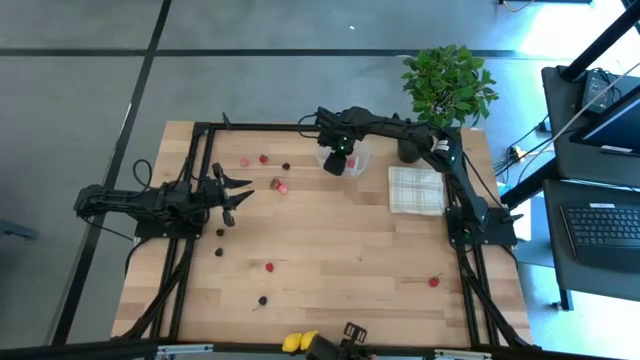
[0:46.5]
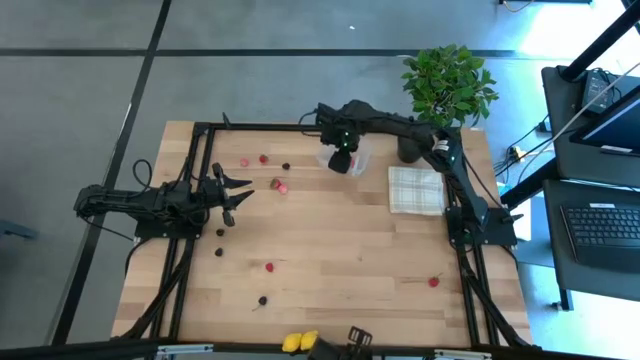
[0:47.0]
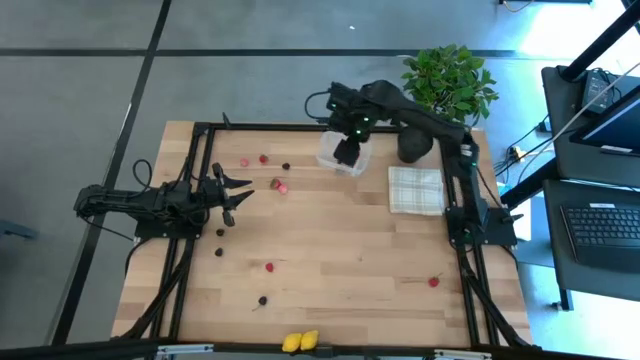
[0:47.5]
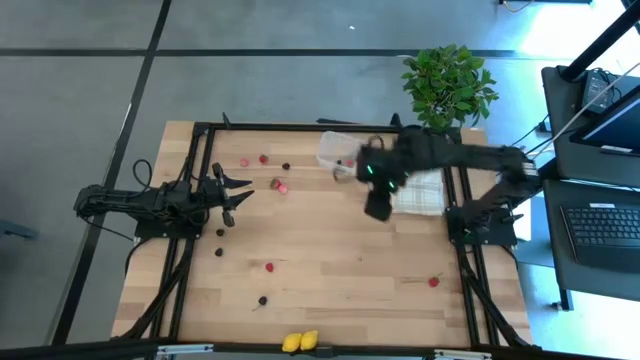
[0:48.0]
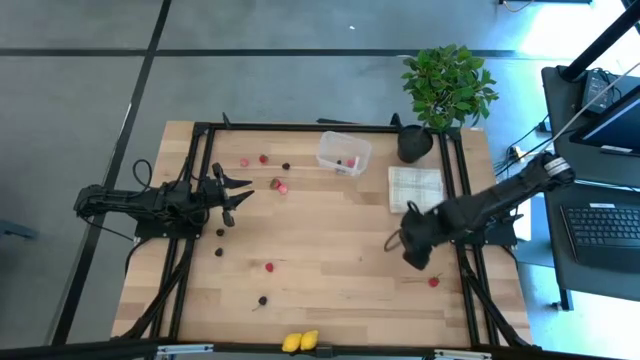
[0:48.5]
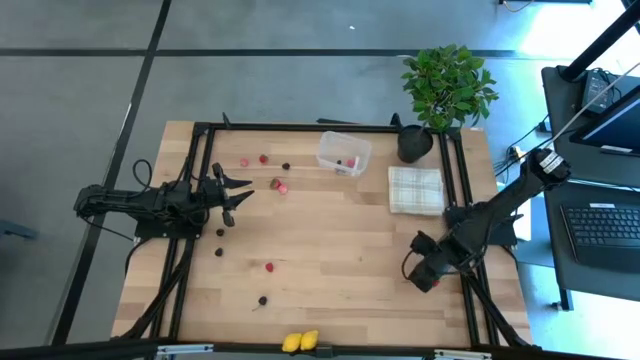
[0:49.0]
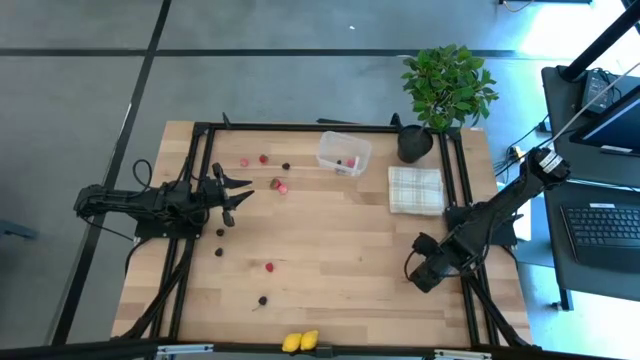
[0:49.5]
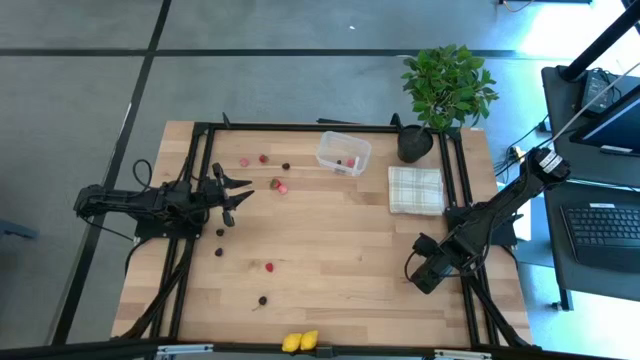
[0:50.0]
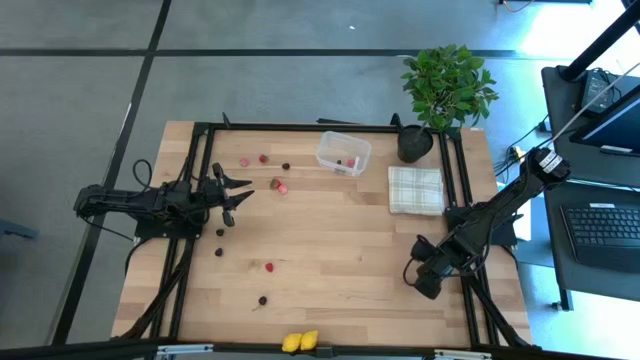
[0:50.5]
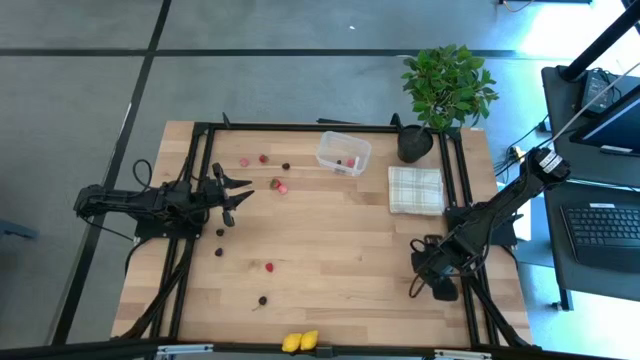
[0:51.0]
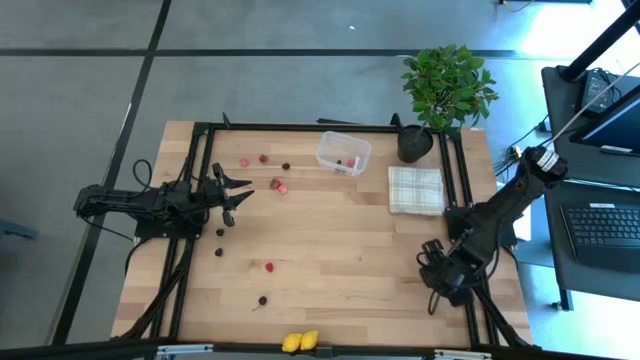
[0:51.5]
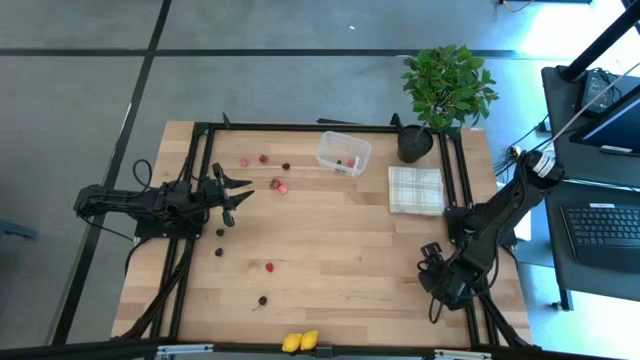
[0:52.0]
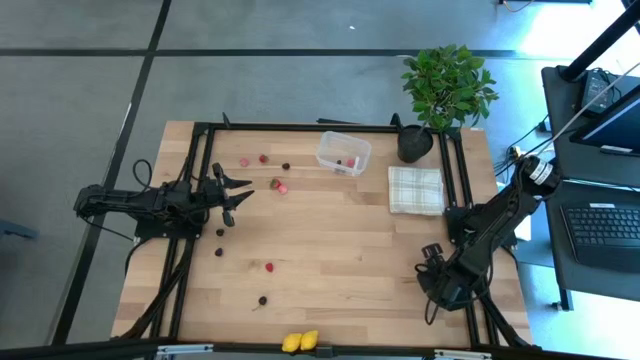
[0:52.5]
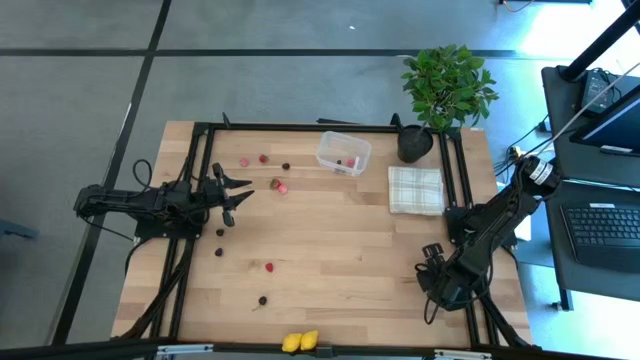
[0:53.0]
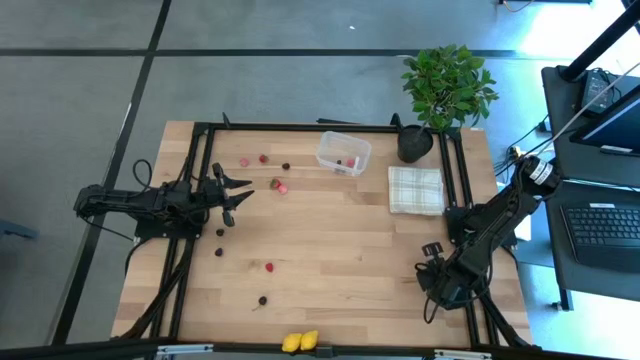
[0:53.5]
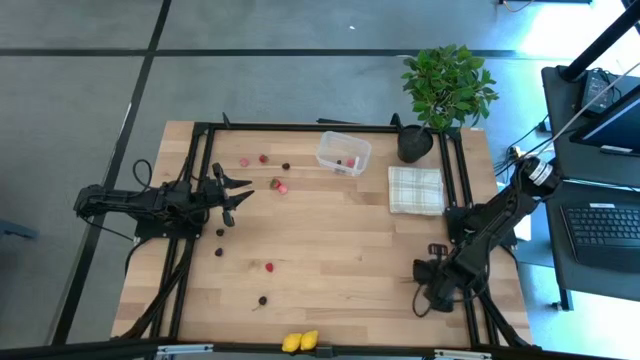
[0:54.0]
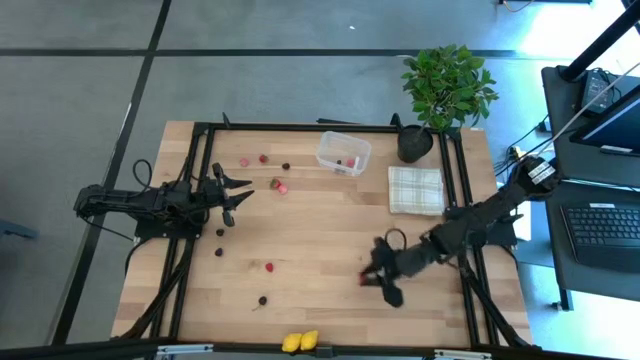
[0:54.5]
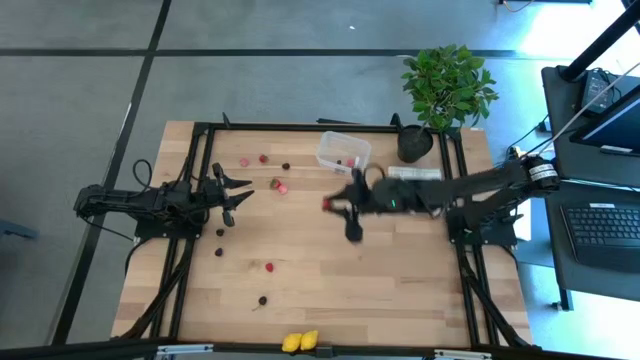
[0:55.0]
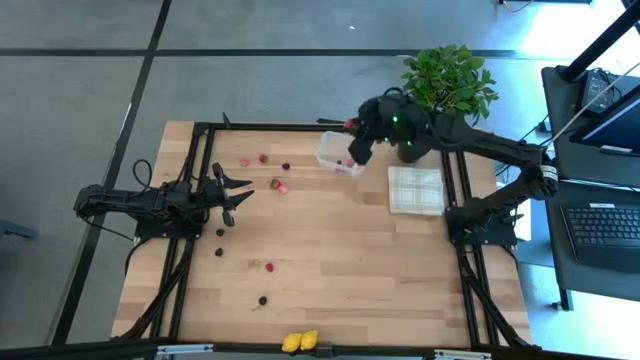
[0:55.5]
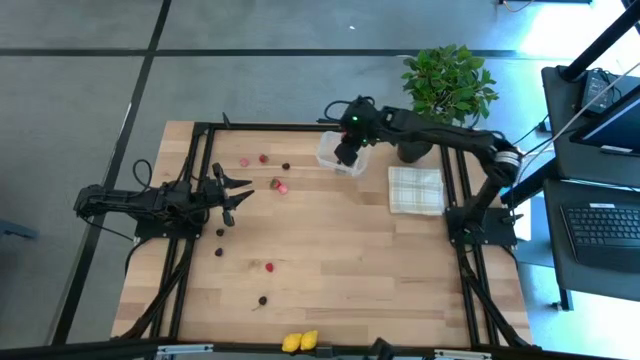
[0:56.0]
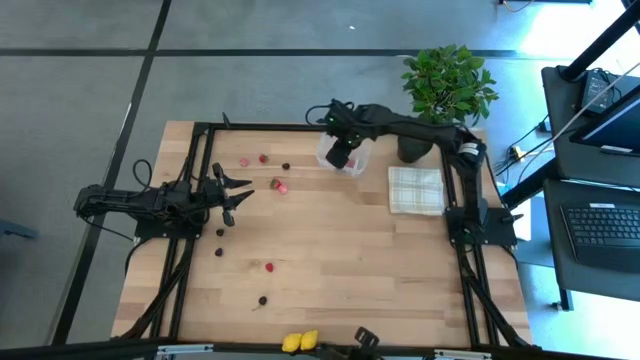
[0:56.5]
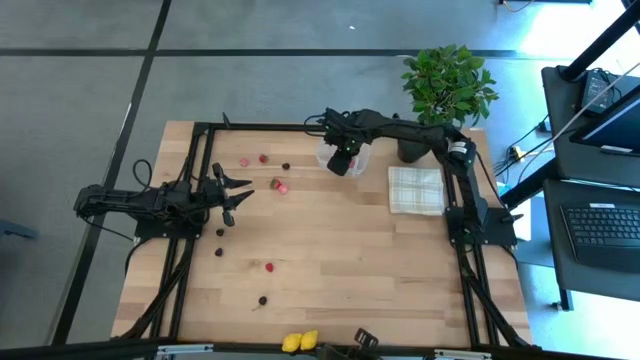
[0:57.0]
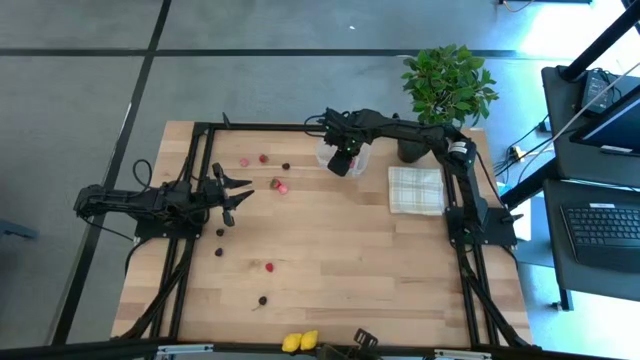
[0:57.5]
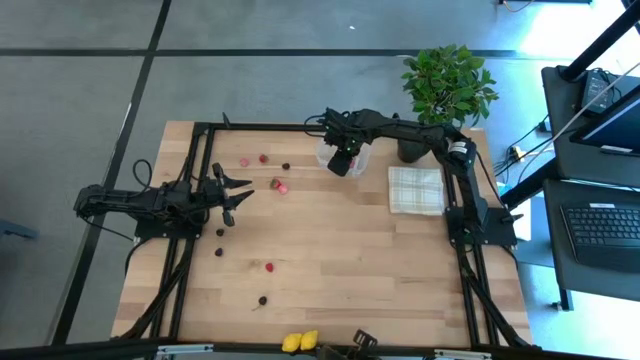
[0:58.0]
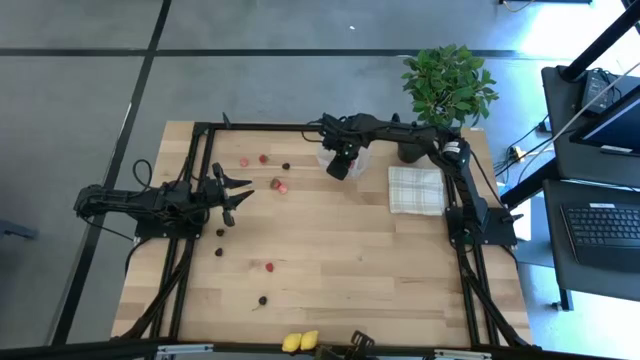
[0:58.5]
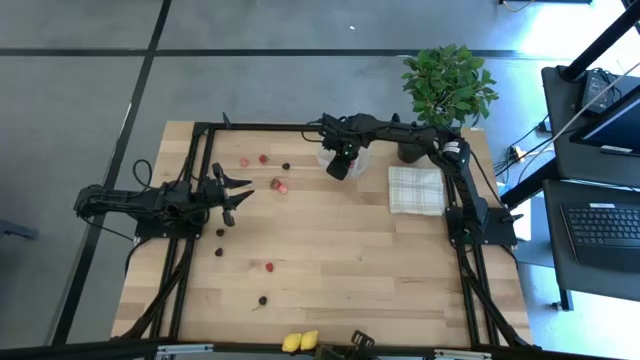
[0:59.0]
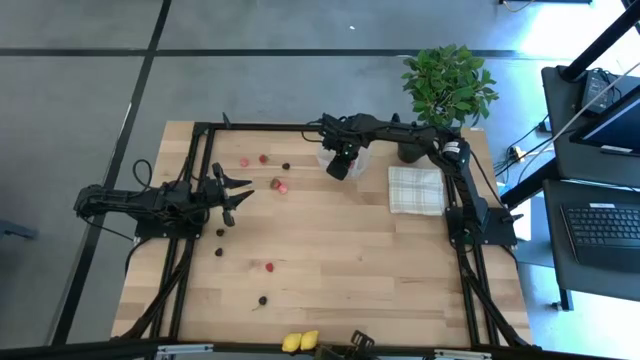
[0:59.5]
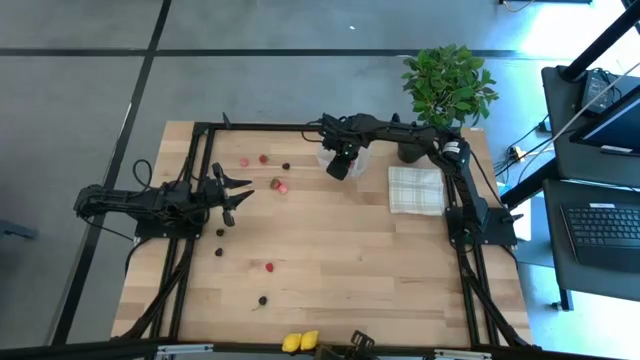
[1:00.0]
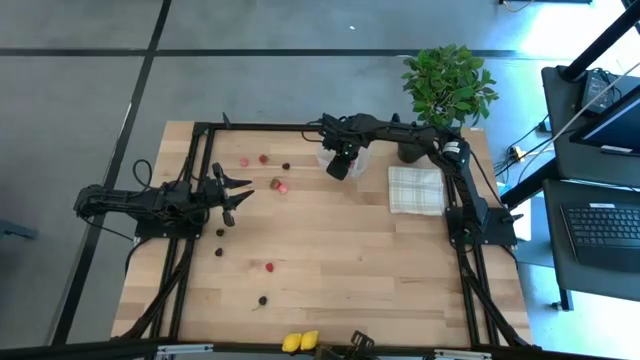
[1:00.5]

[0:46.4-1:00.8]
Task: Pick and placing Produce into tupperware
Put the bottom strawberry into the transparent container

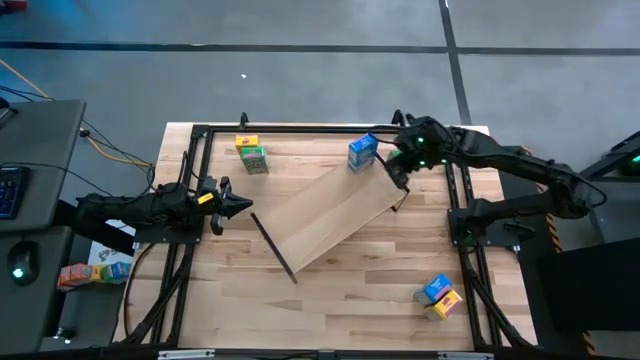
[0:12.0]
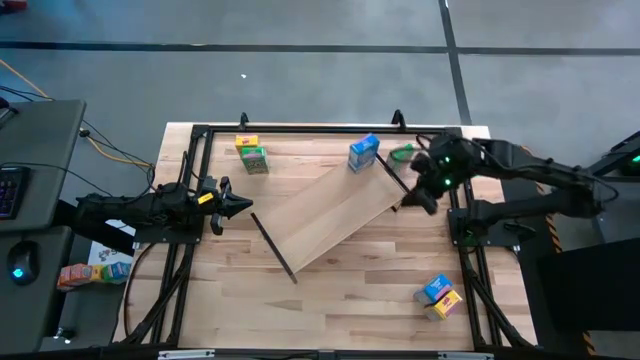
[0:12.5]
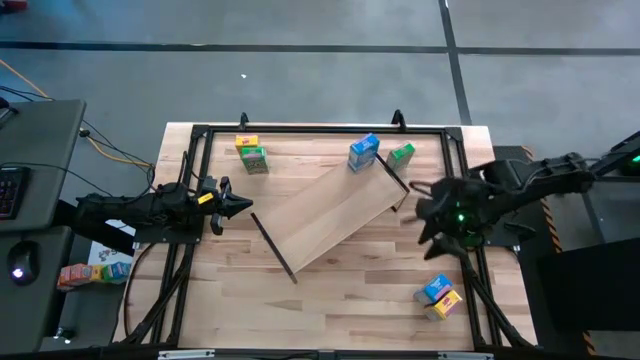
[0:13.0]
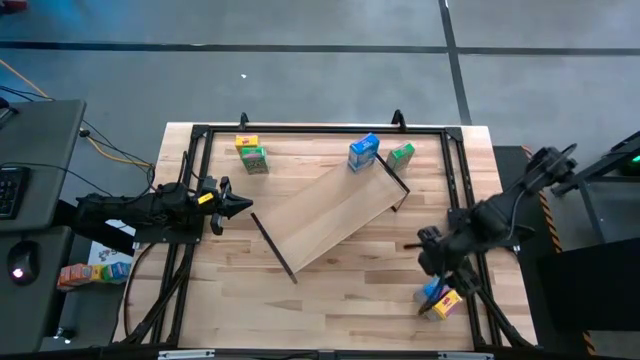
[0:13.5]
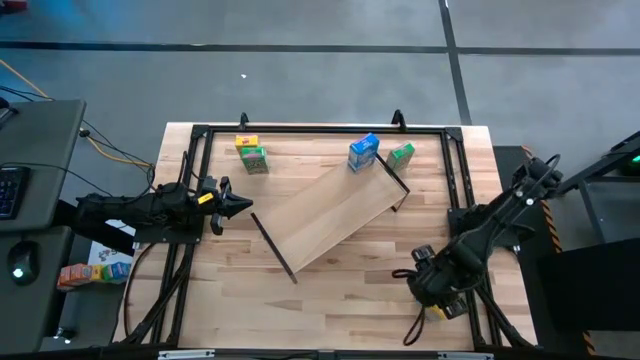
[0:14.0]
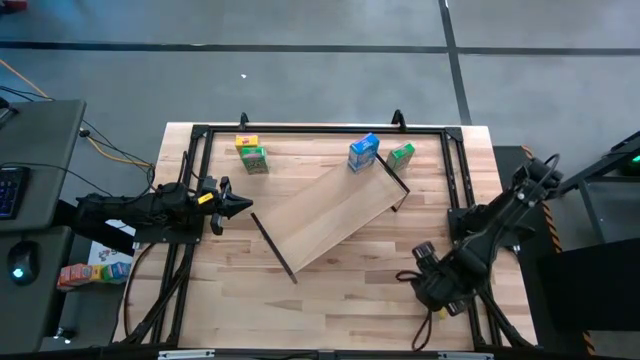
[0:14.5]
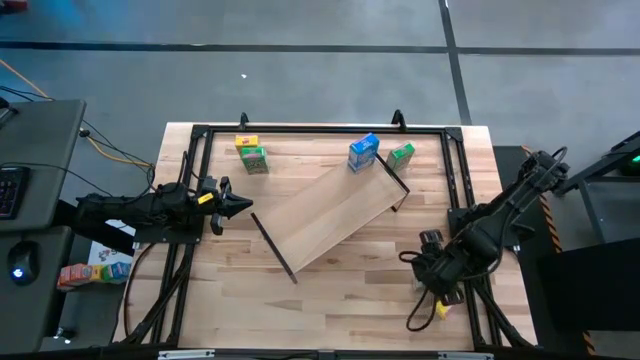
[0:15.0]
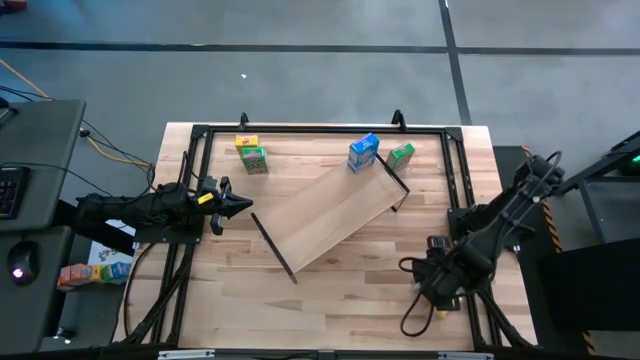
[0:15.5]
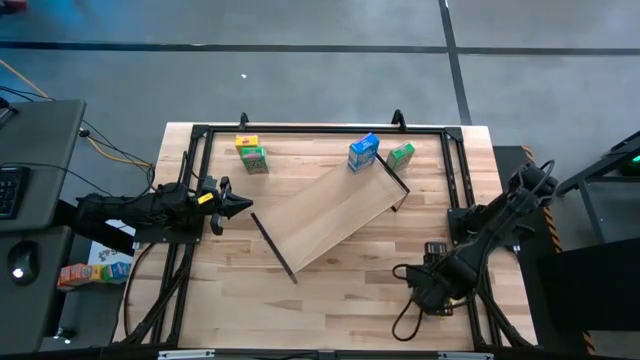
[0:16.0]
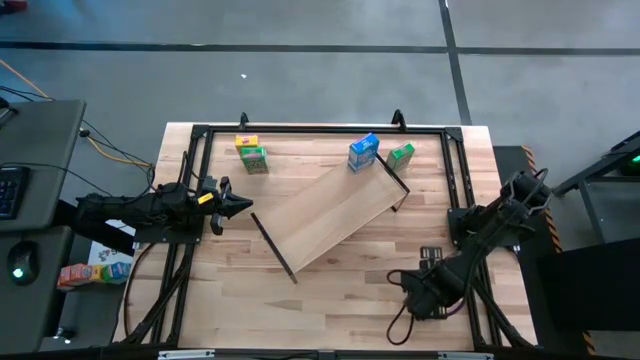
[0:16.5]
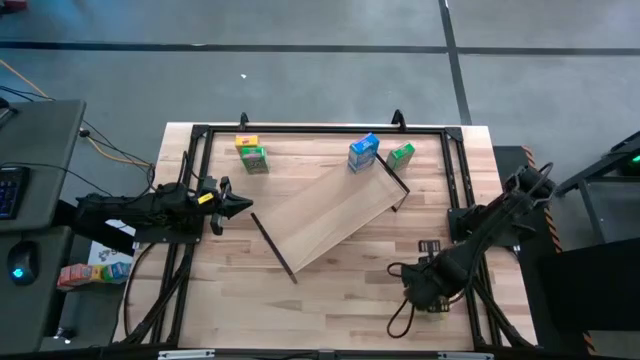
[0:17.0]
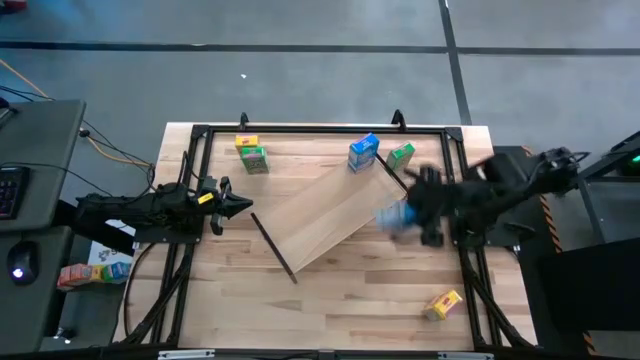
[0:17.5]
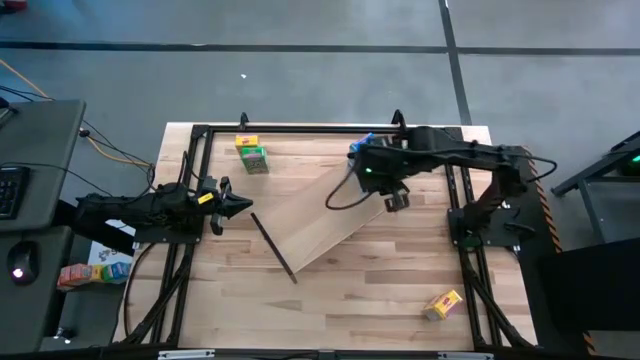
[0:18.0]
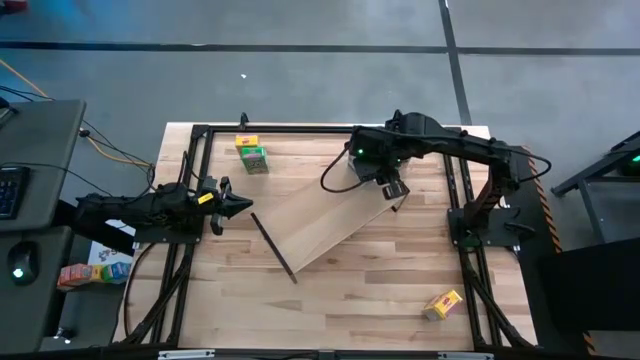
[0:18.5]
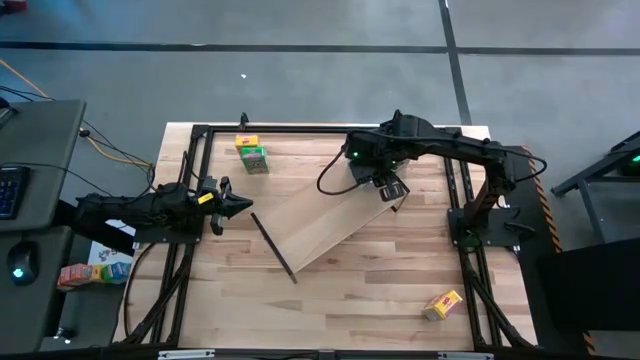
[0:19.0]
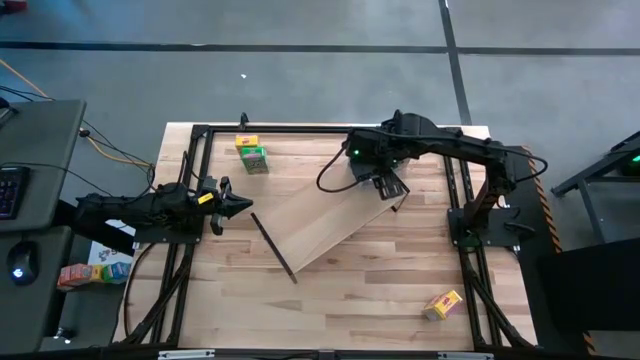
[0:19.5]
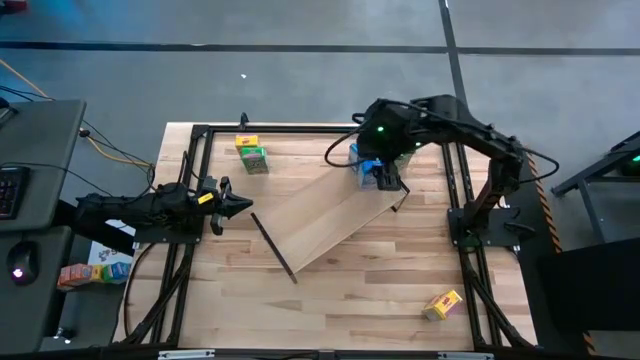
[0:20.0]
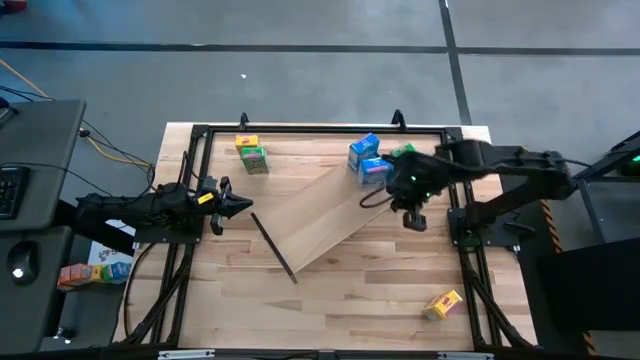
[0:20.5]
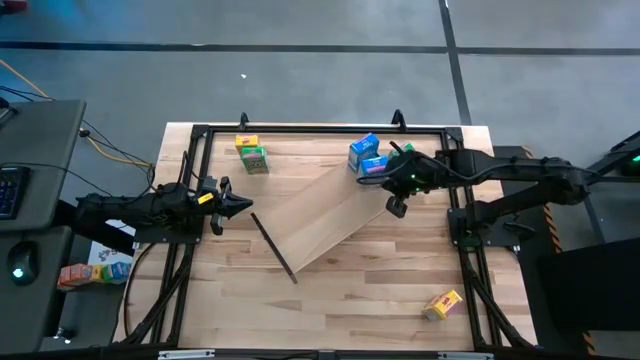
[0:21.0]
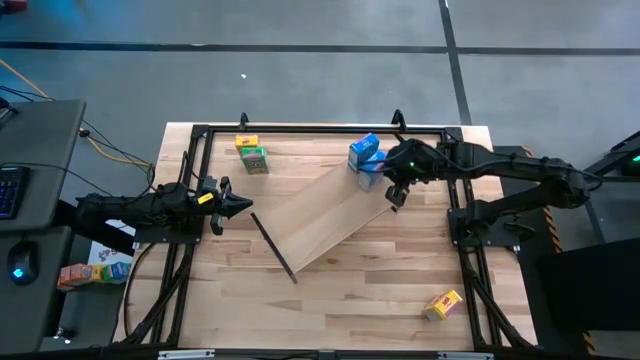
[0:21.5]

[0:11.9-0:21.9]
Task: Stack cereal on shelf
Put the blue cereal box on the shelf aligned with the other blue cereal box
